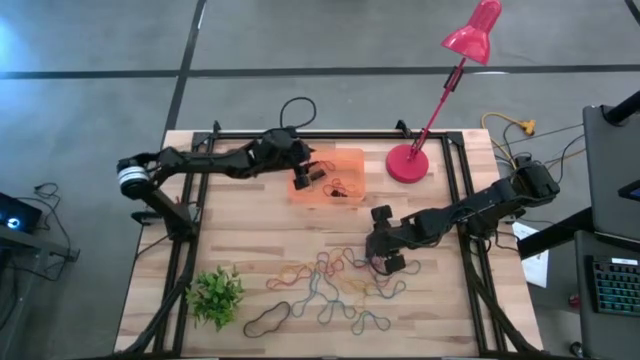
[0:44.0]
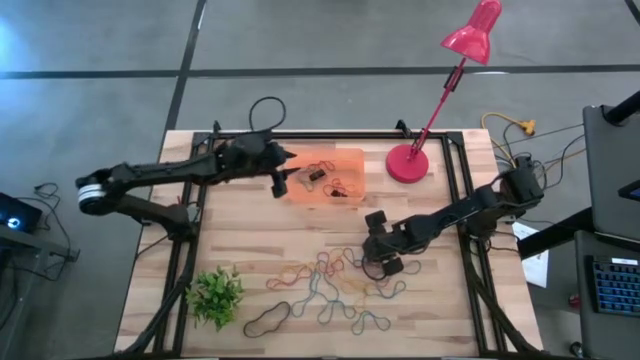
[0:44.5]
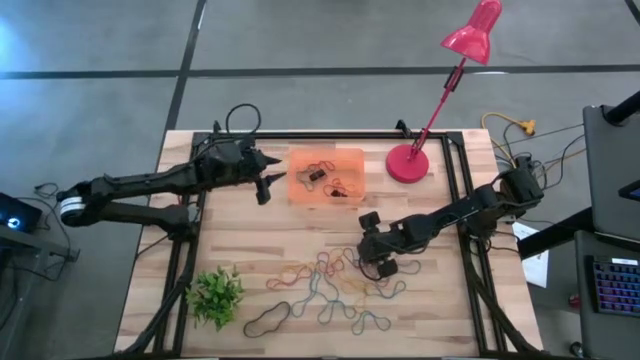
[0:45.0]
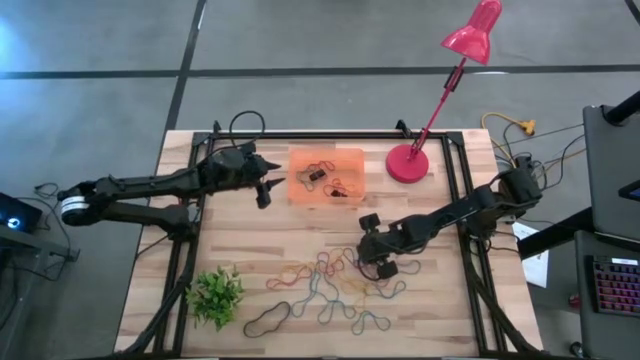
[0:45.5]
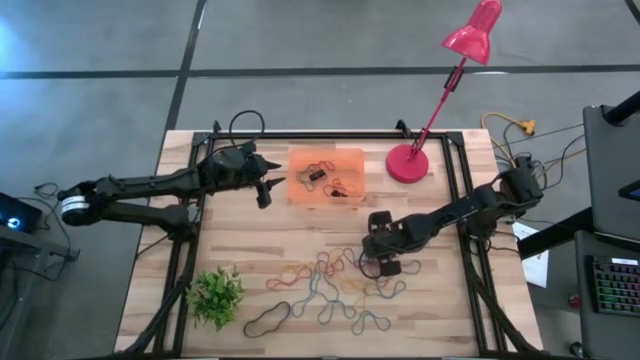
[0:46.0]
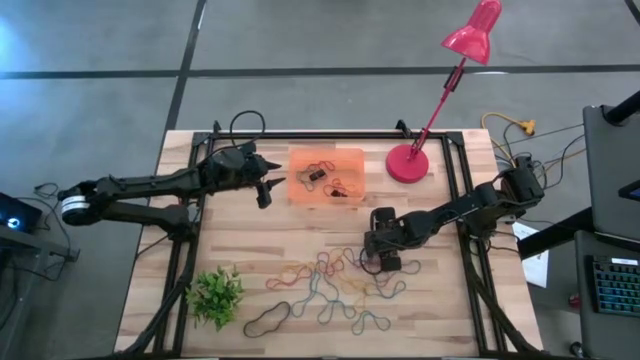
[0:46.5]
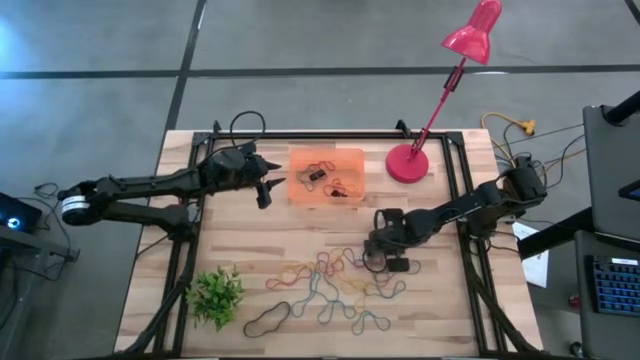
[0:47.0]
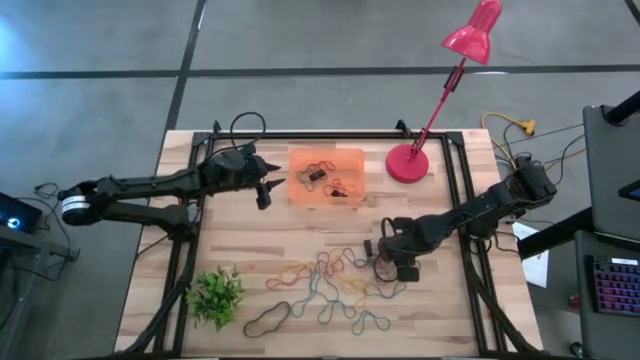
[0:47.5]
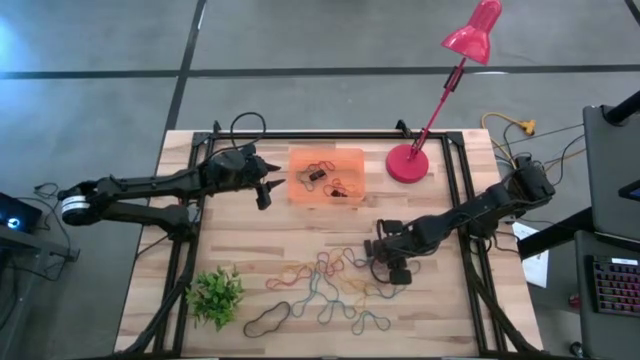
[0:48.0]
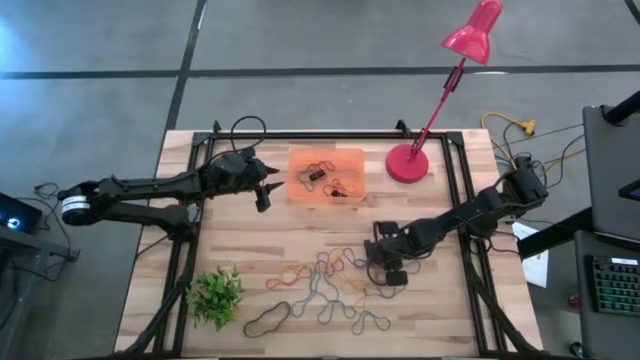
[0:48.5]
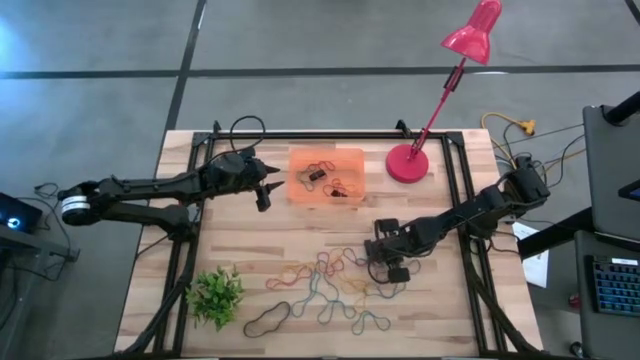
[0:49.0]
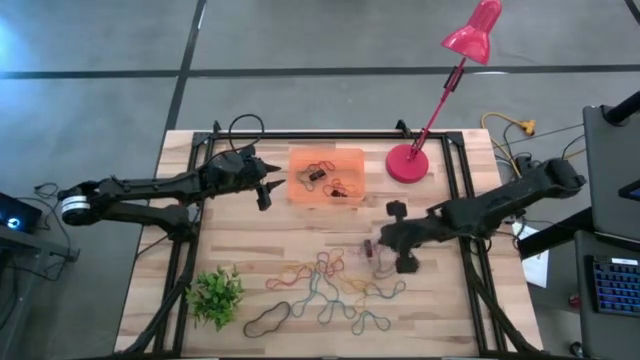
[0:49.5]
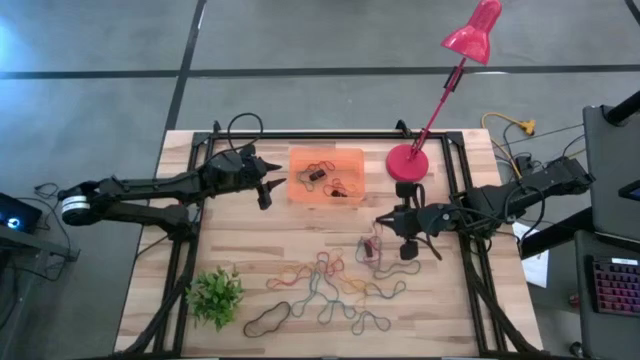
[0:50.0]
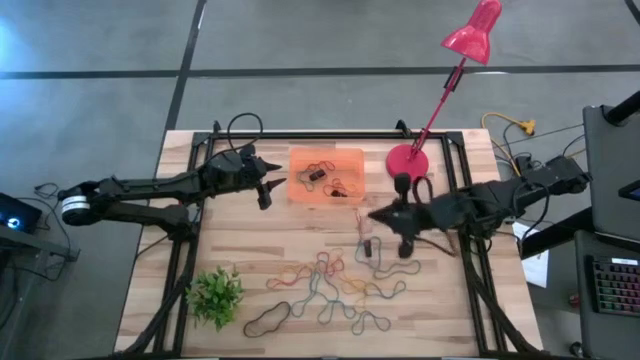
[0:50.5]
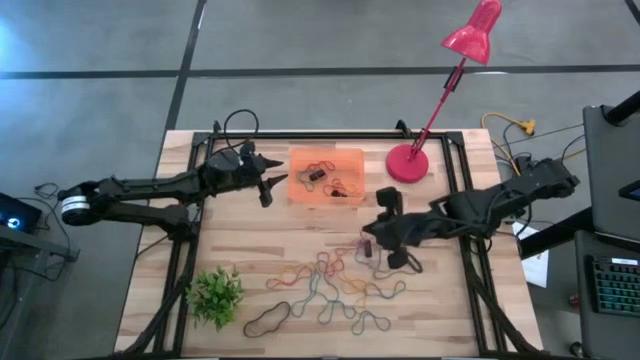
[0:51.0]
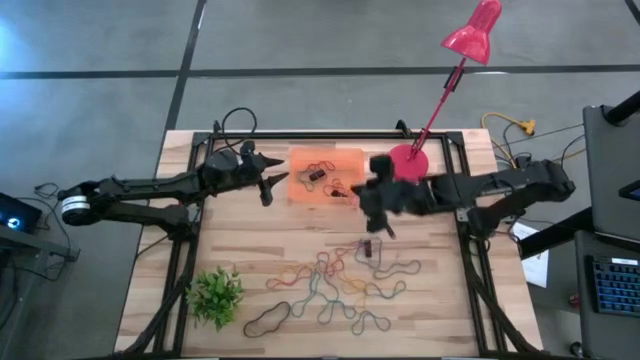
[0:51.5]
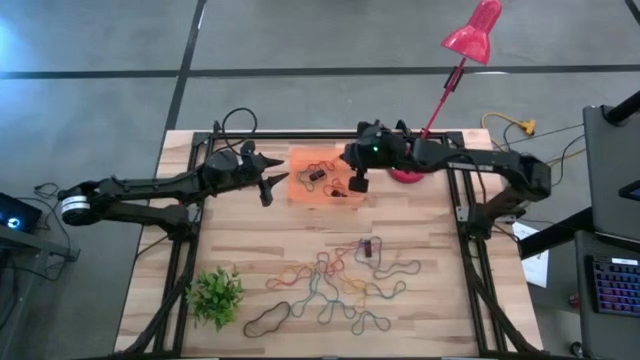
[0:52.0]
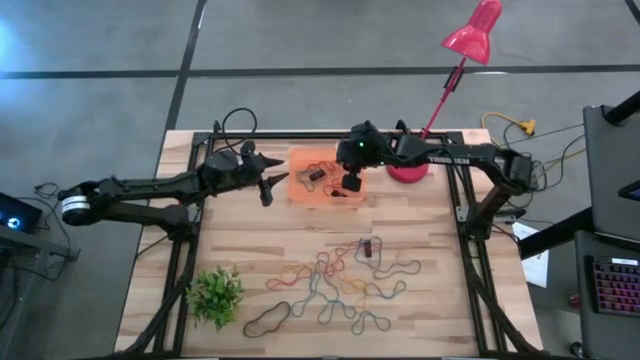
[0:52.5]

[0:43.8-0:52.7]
Task: Pick and place rubber bands into bin
Put the red rubber band into the orange bin

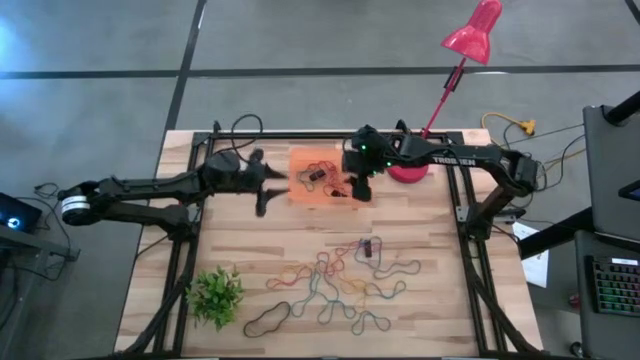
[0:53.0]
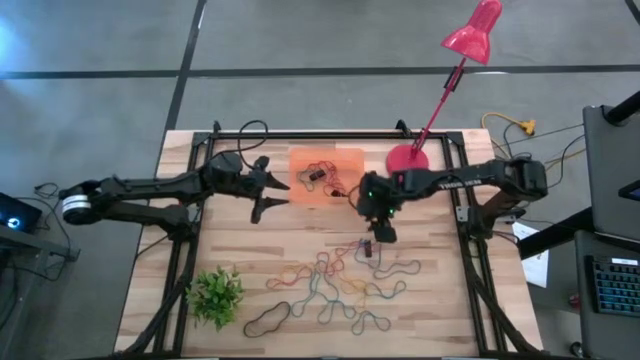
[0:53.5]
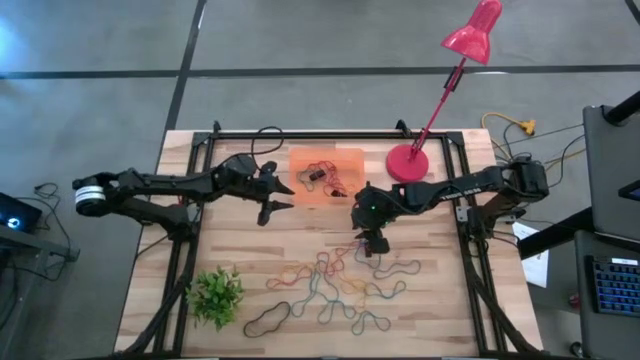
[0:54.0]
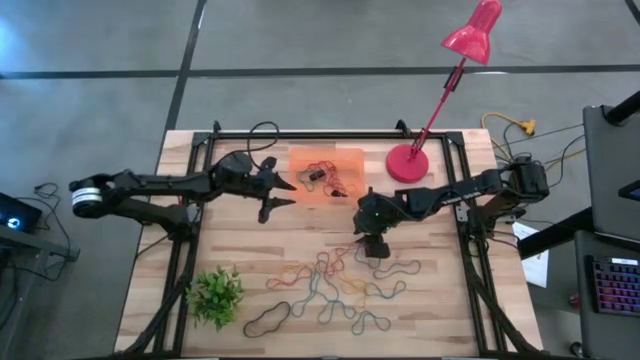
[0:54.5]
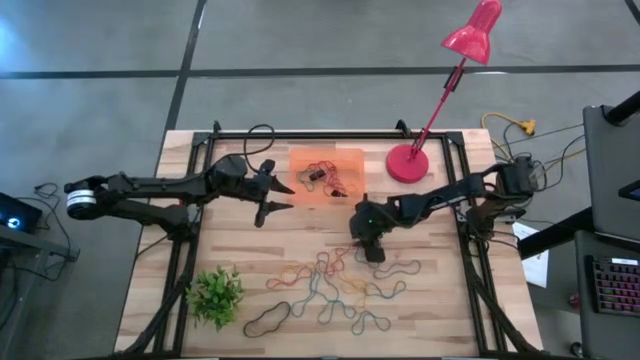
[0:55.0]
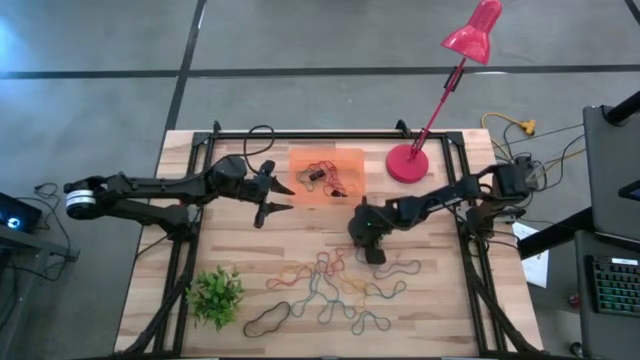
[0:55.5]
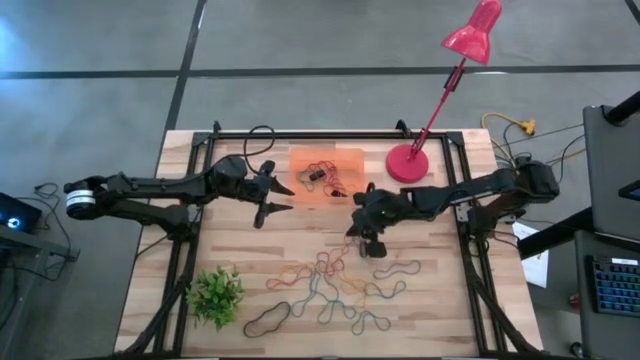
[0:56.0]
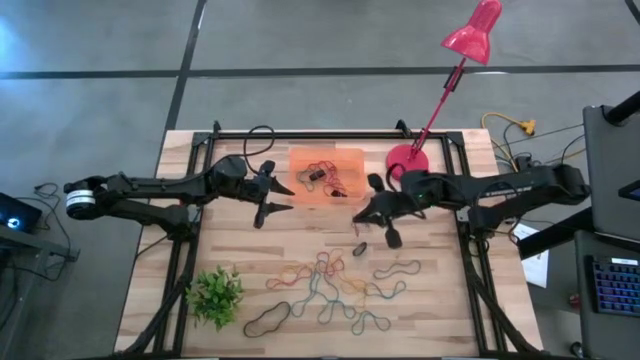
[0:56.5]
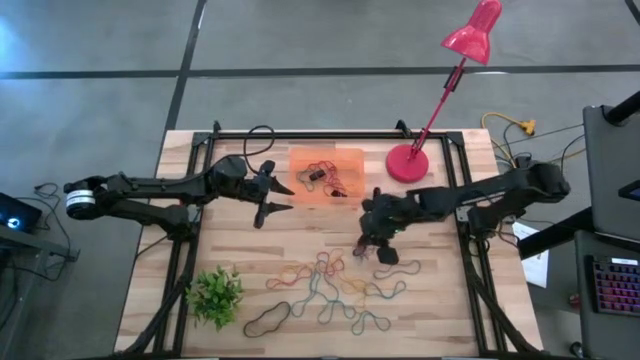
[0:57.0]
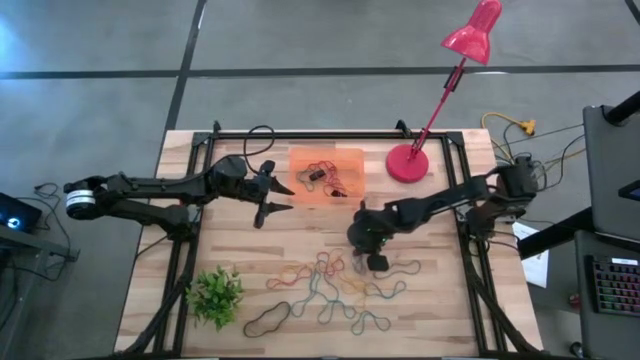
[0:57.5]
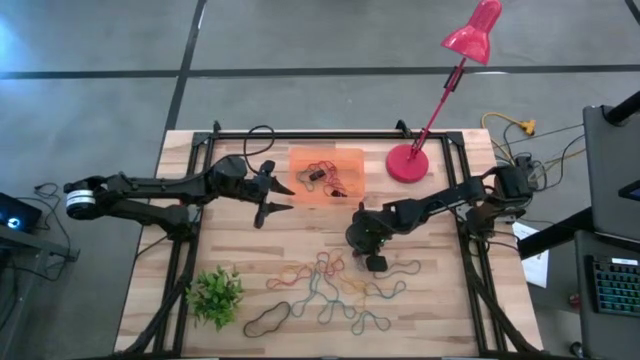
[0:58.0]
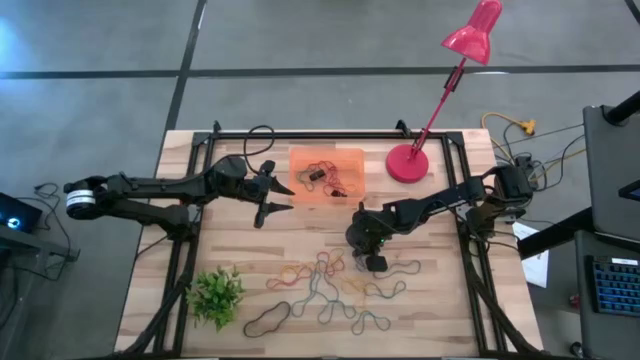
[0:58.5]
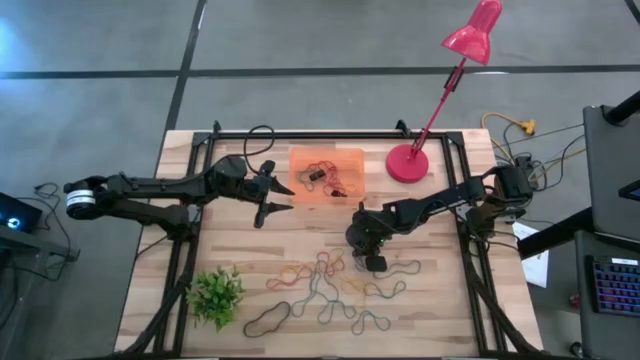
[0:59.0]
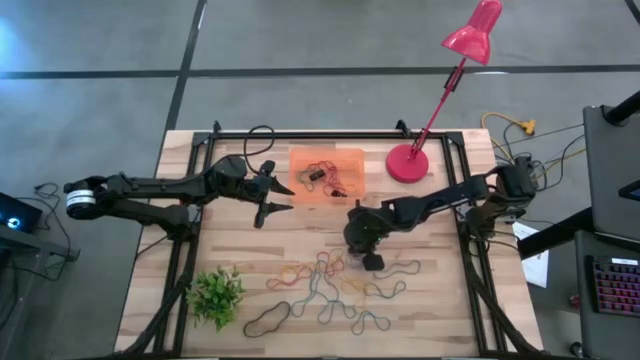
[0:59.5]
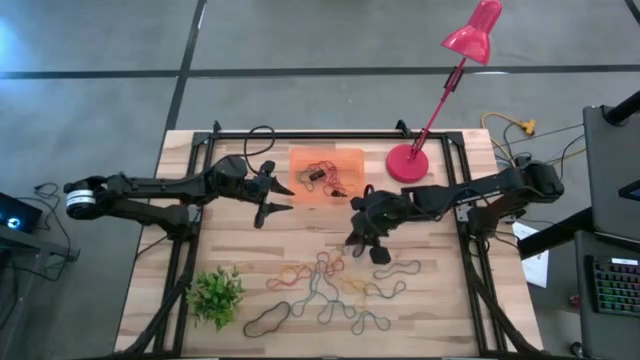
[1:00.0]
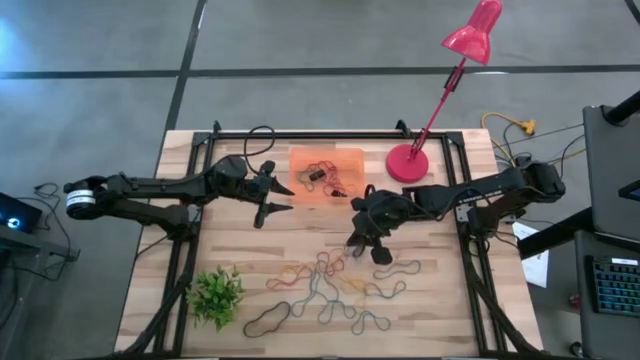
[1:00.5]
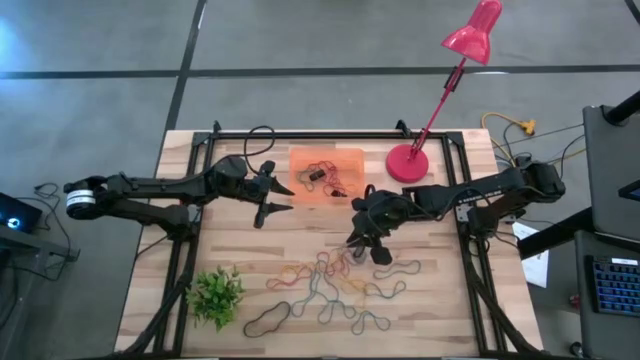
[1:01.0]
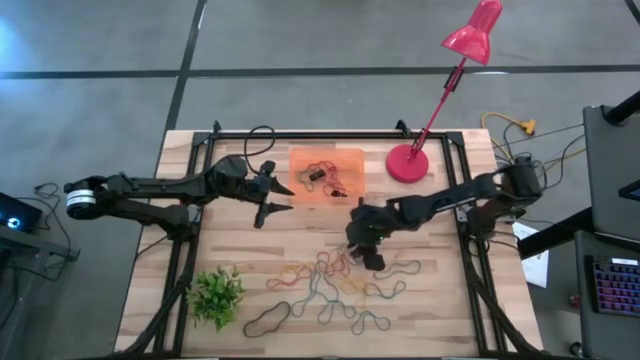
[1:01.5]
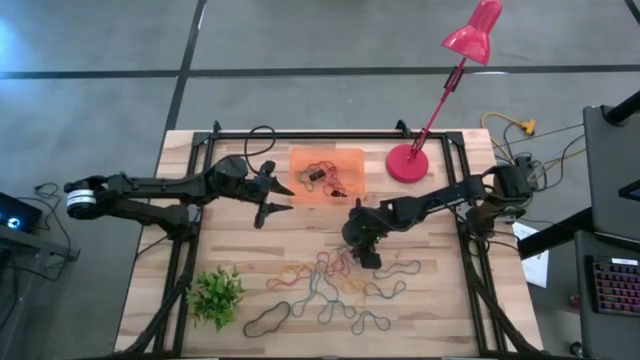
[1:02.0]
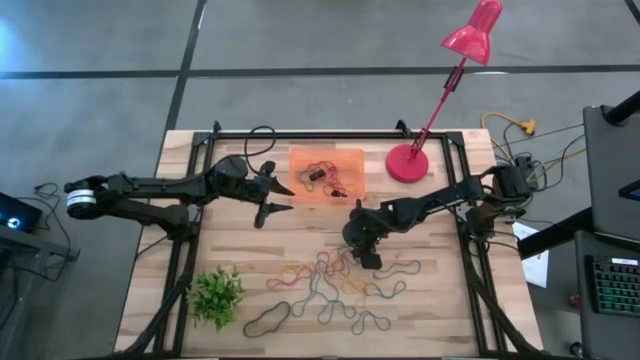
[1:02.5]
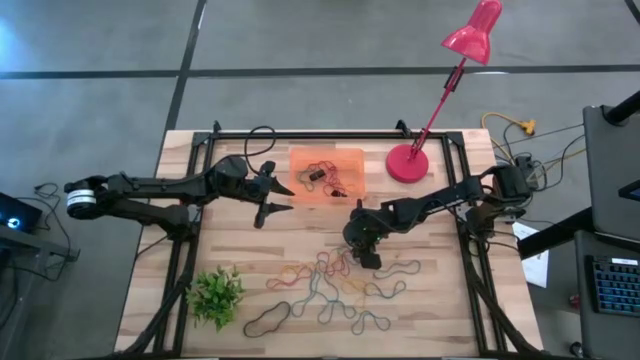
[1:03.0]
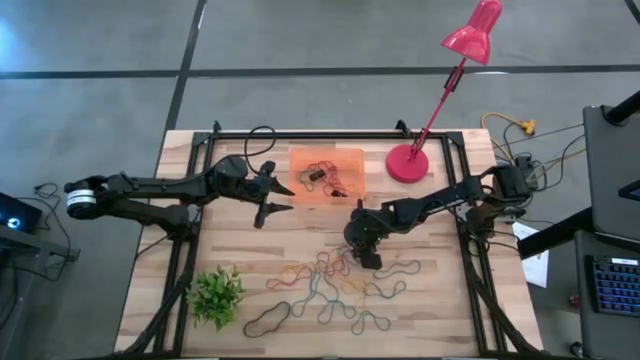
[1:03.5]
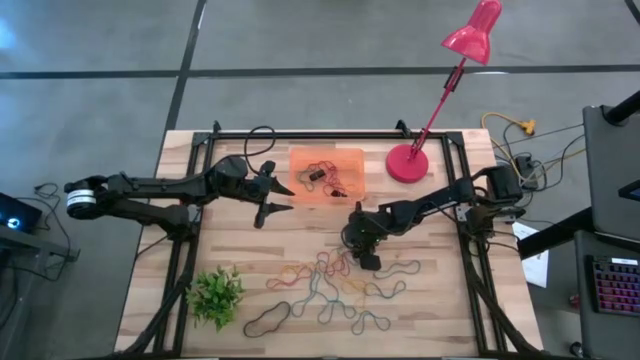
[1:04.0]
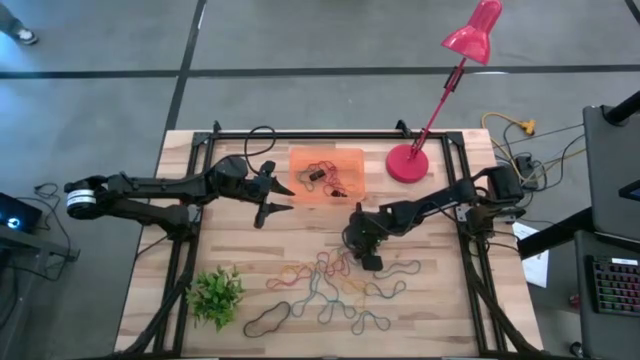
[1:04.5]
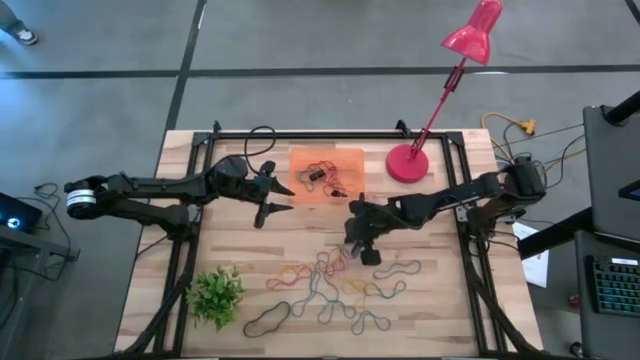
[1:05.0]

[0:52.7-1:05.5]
Put the red rubber band into the orange bin
